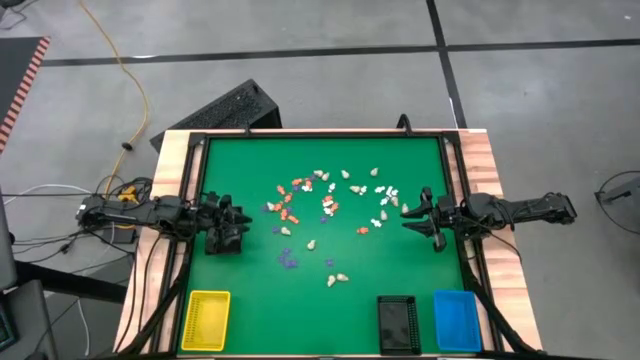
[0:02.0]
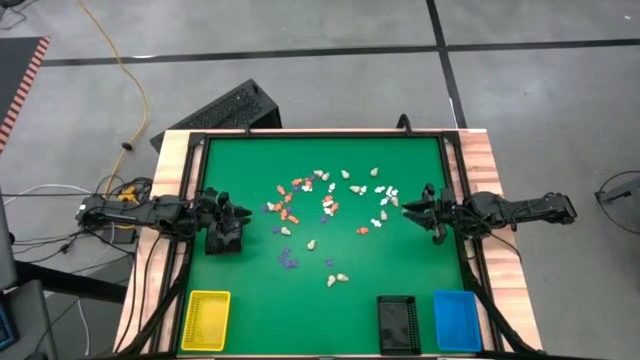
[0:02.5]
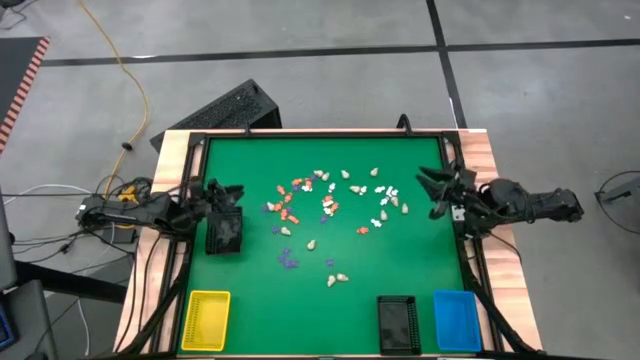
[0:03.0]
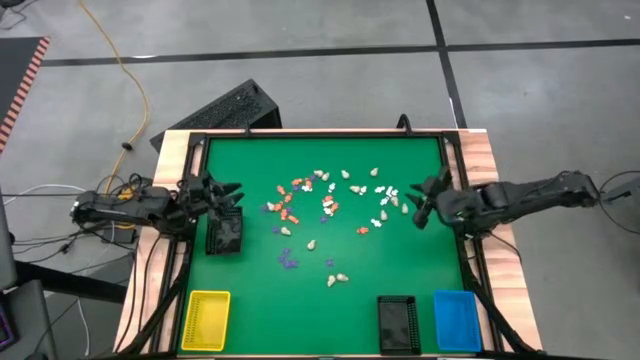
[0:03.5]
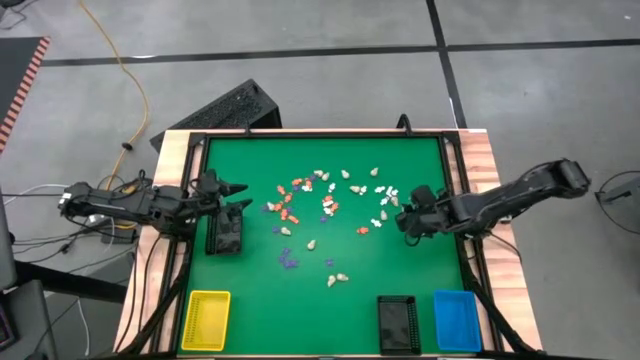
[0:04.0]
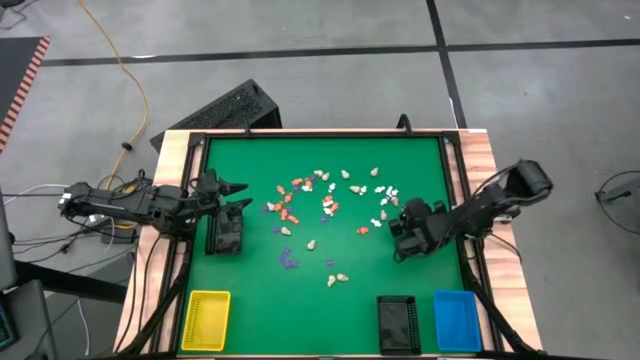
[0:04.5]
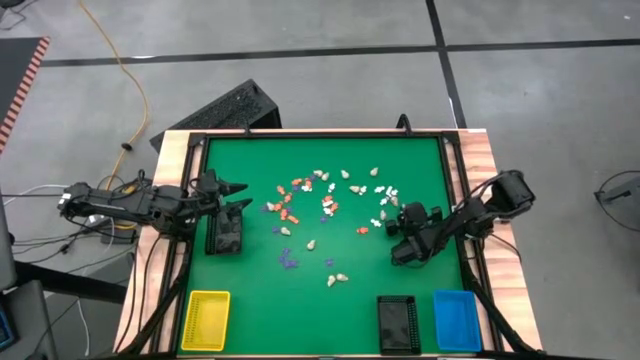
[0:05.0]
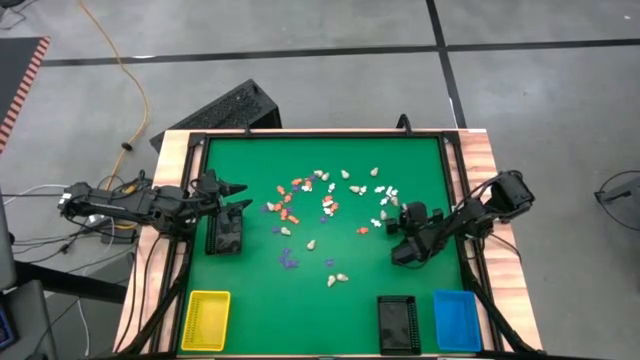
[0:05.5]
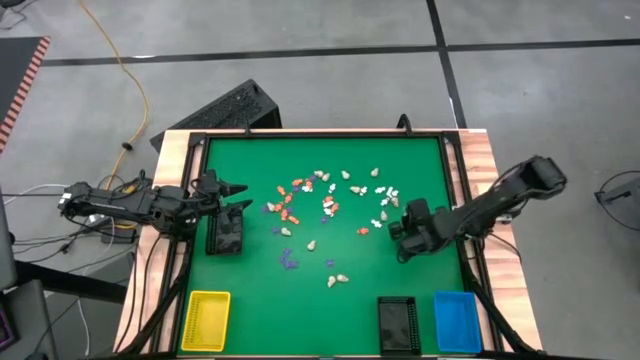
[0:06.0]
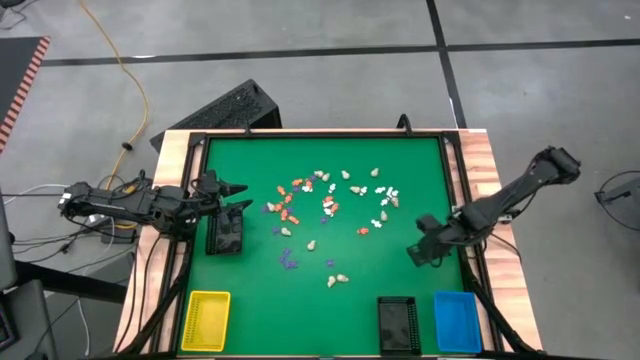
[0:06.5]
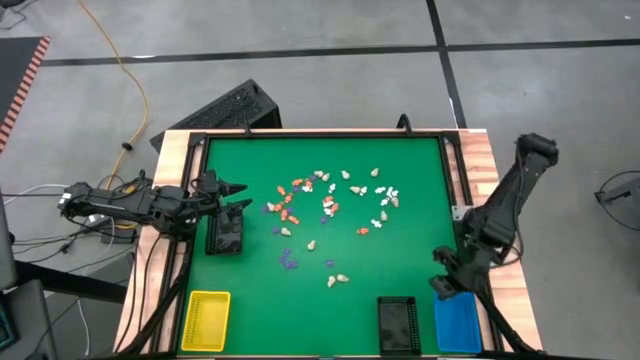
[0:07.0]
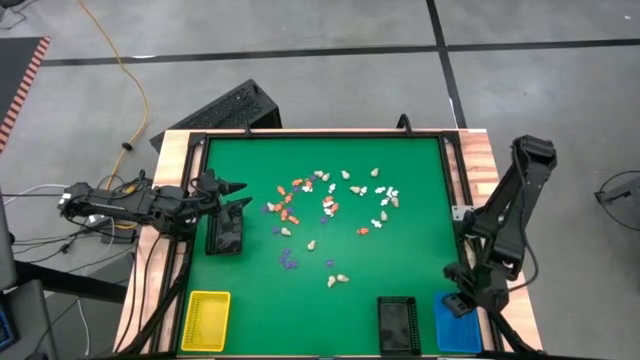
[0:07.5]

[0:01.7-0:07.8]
Task: Sort Halloween decoration
Put the white skull toy into the blue basket

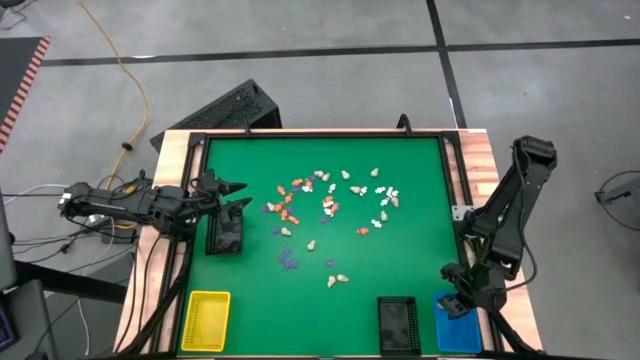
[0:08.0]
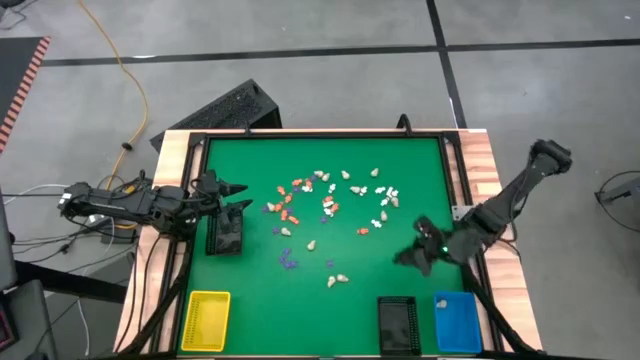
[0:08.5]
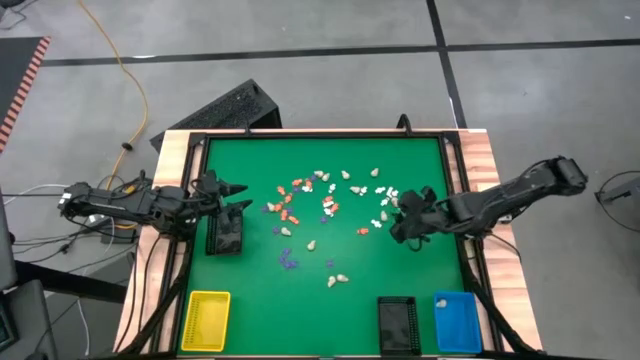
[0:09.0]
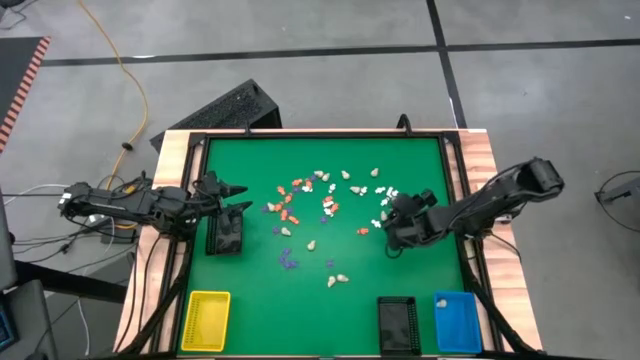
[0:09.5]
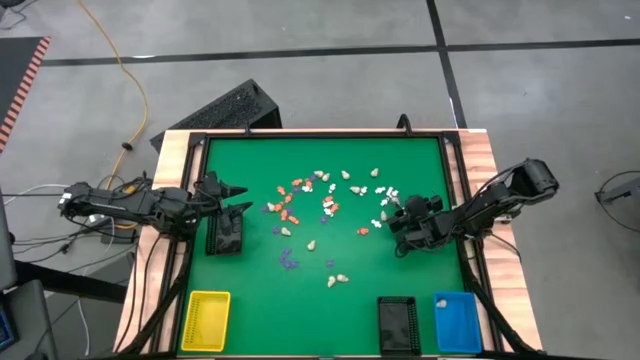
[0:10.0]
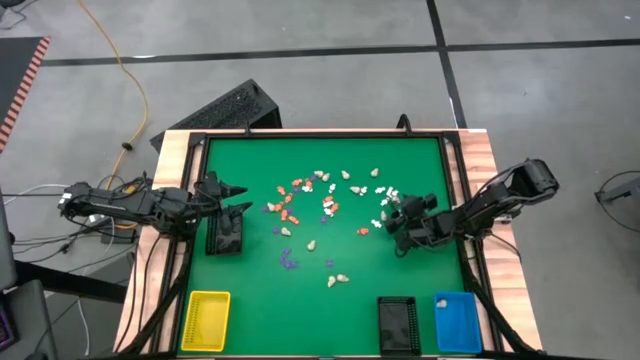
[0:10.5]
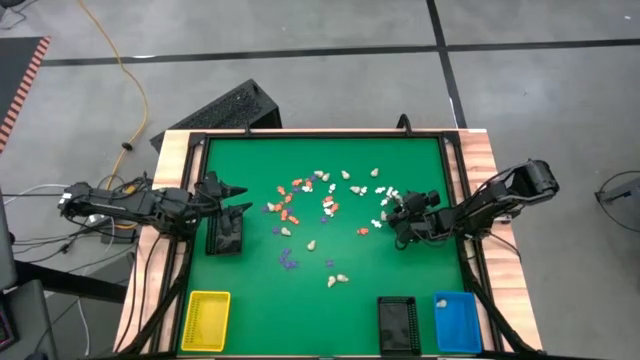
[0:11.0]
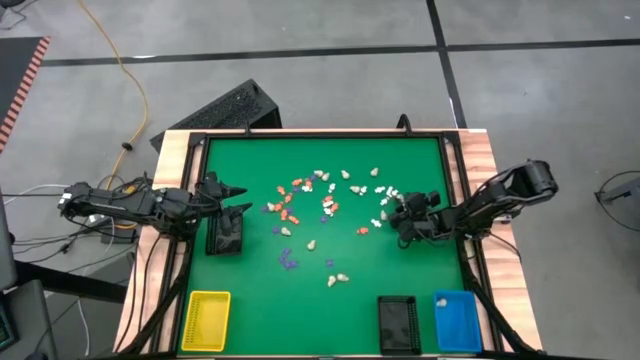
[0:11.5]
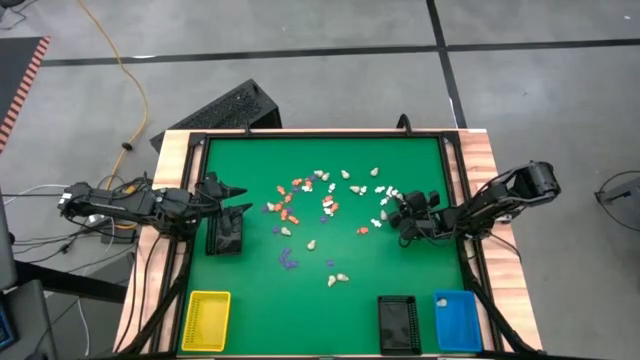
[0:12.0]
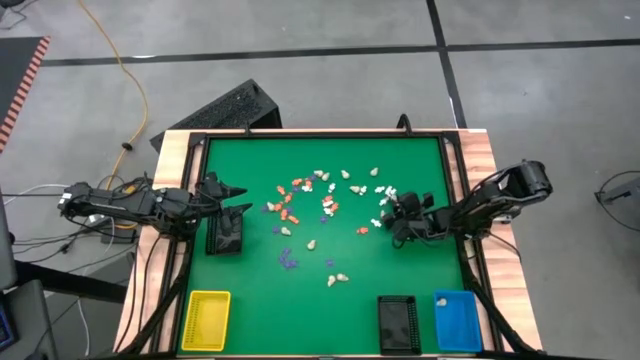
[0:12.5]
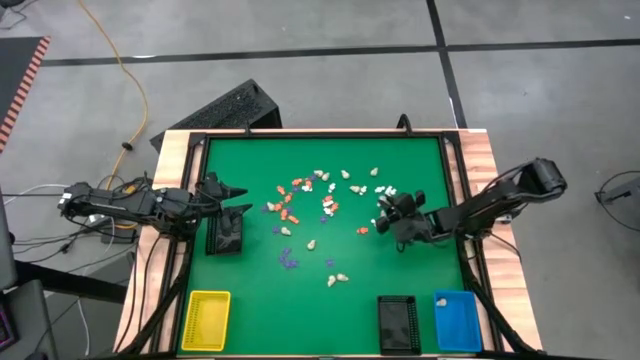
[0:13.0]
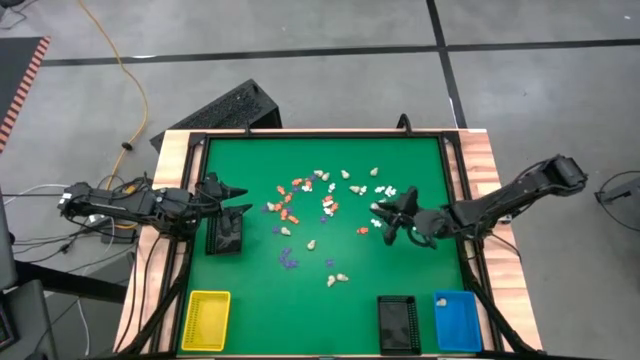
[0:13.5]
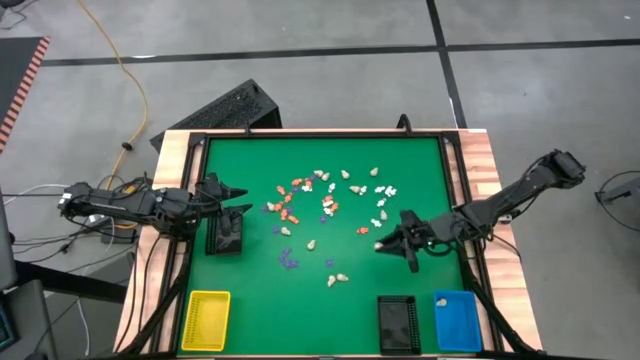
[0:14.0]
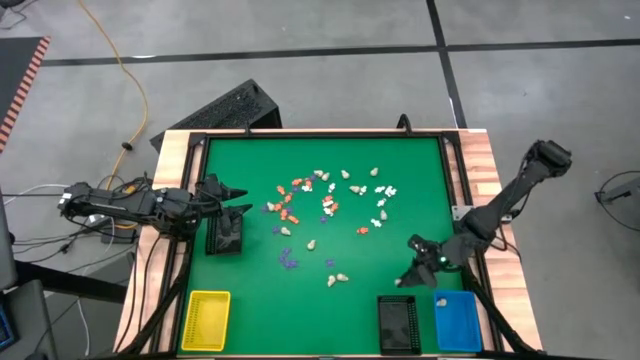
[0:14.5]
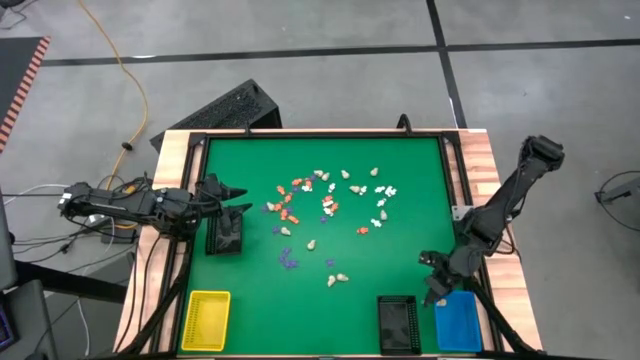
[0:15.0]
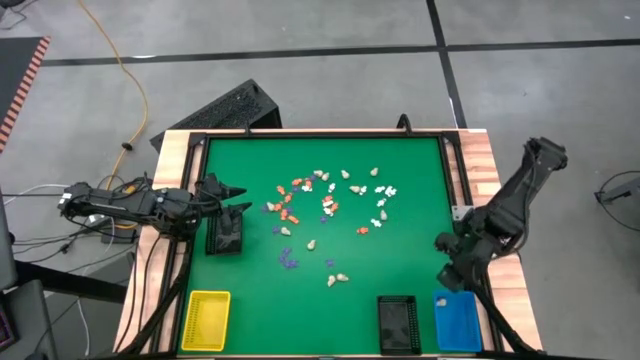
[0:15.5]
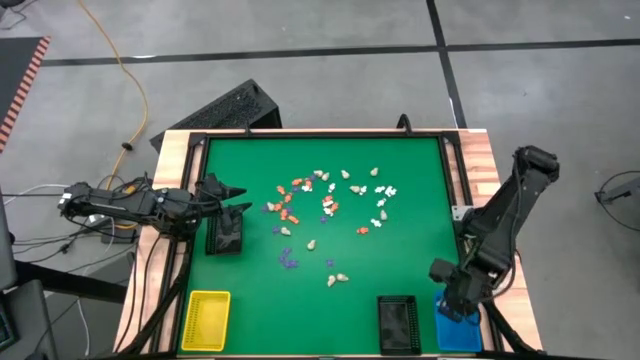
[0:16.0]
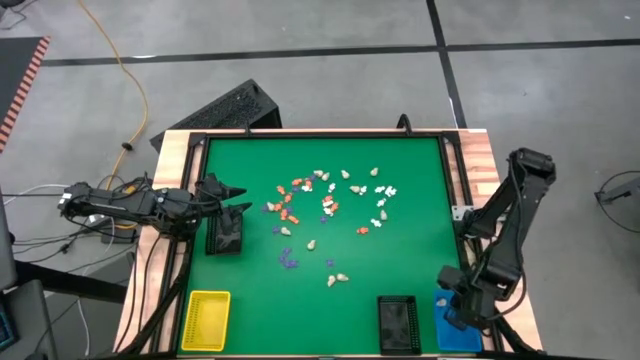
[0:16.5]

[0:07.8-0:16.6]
Put the white skull toy into the blue basket

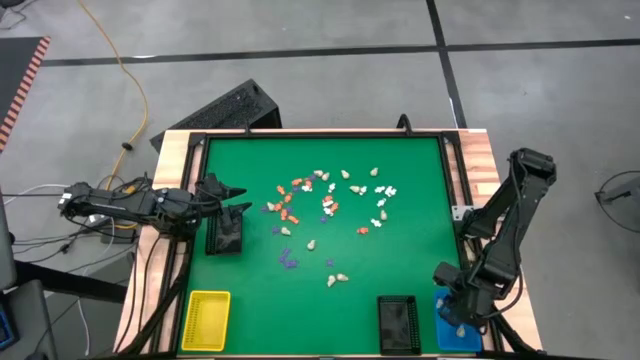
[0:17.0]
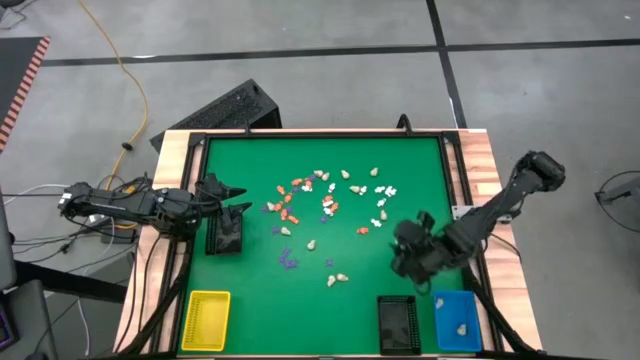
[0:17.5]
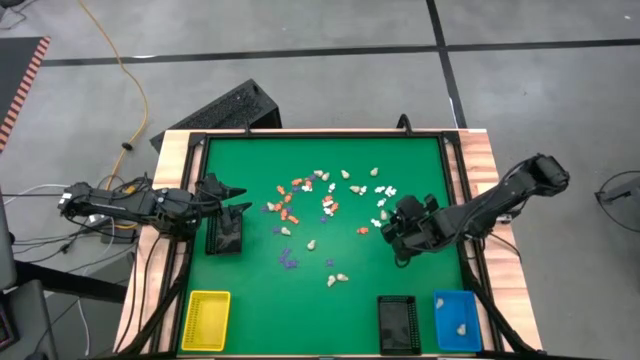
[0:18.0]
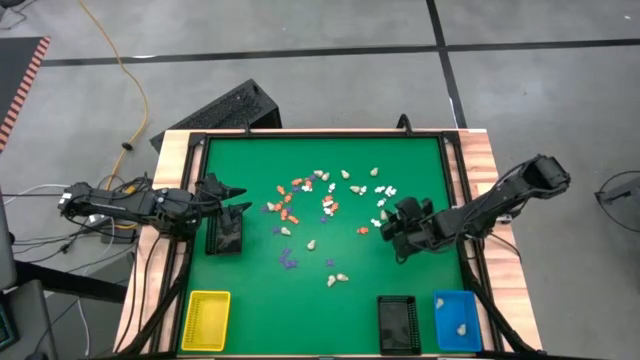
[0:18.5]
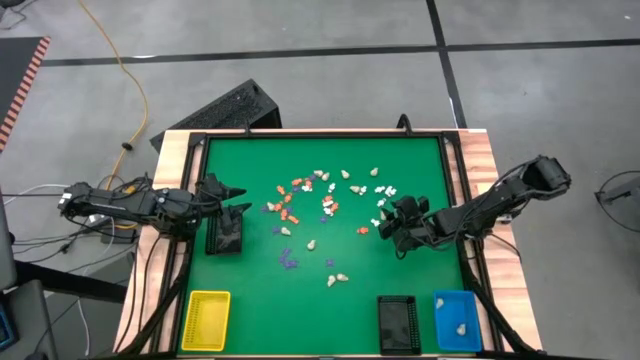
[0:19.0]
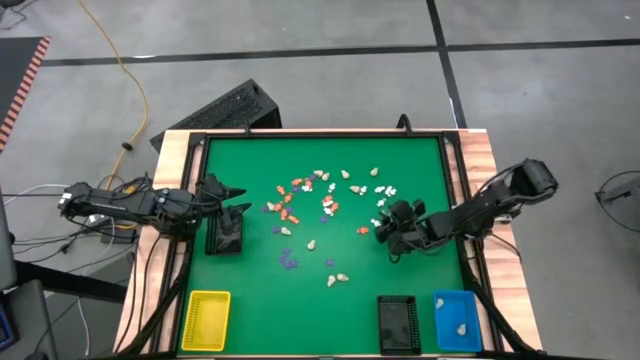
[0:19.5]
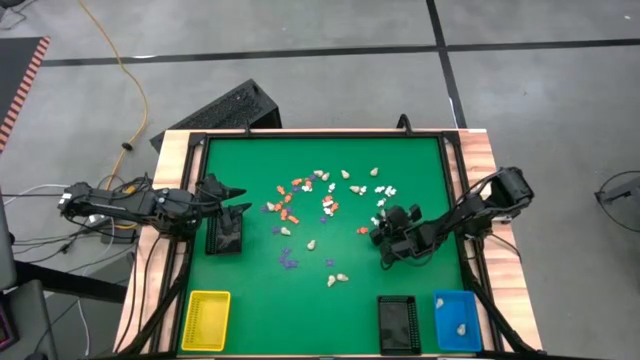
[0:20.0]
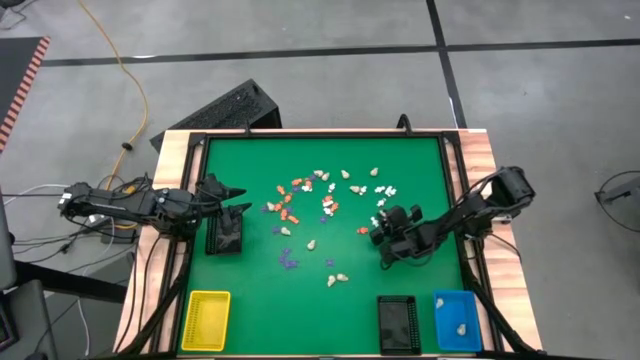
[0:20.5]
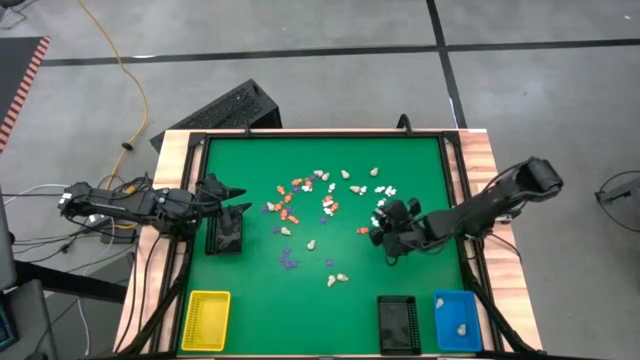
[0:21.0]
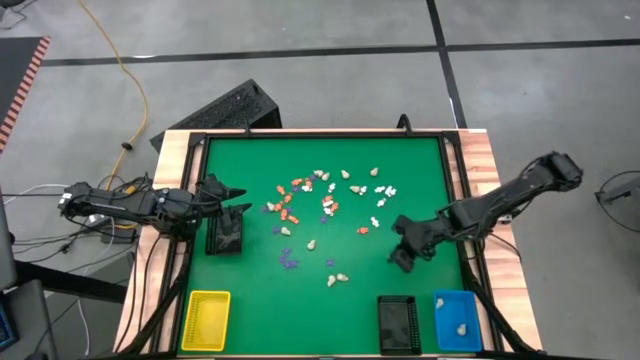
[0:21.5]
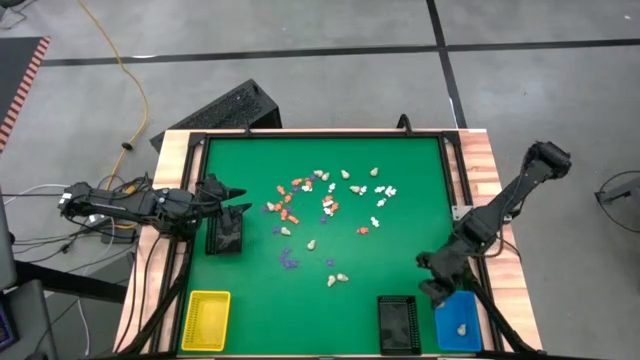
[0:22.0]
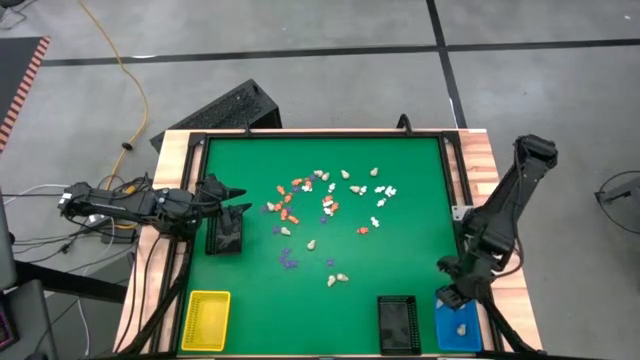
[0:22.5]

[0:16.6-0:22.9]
Put the white skull toy into the blue basket
